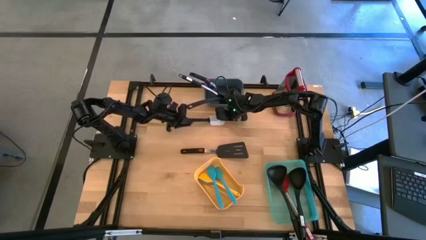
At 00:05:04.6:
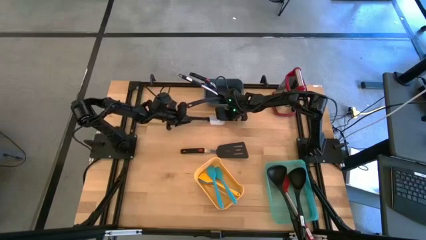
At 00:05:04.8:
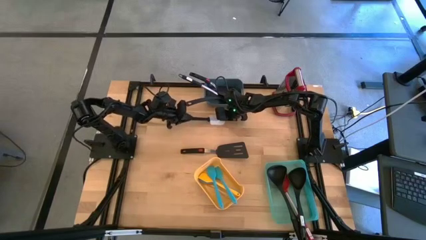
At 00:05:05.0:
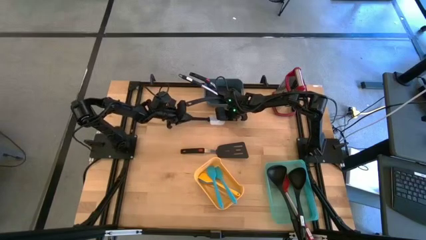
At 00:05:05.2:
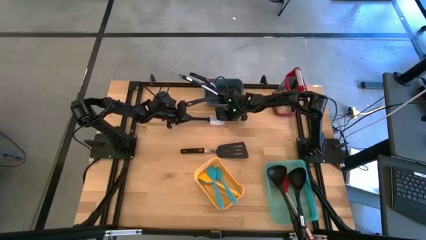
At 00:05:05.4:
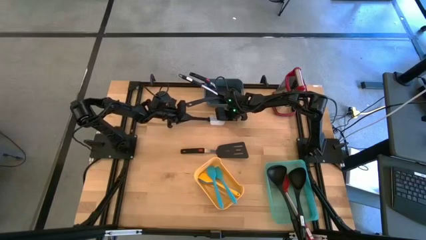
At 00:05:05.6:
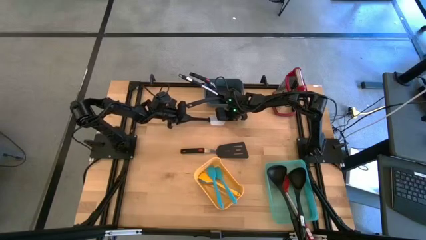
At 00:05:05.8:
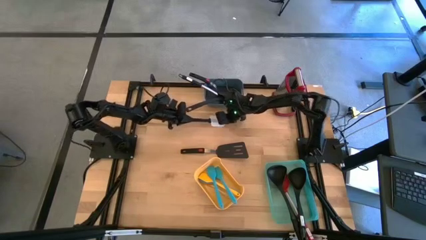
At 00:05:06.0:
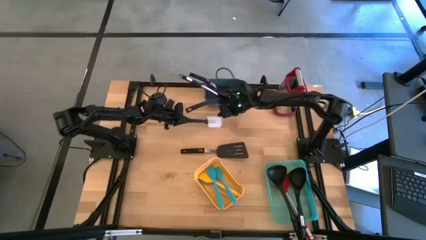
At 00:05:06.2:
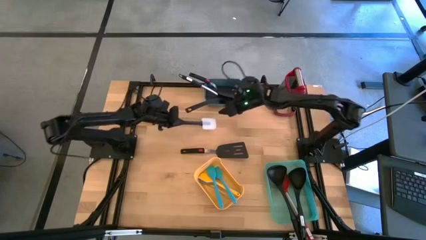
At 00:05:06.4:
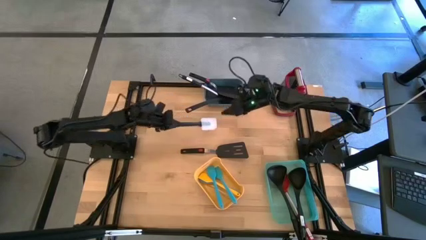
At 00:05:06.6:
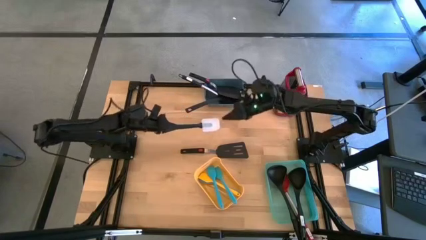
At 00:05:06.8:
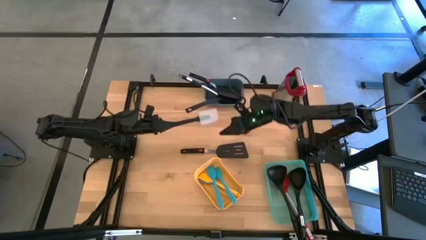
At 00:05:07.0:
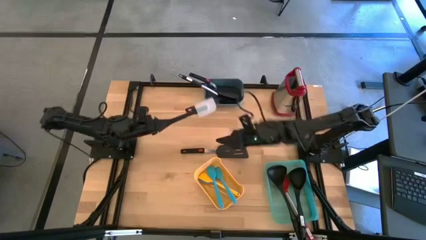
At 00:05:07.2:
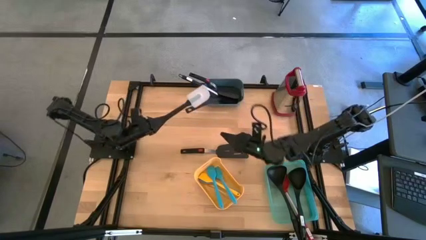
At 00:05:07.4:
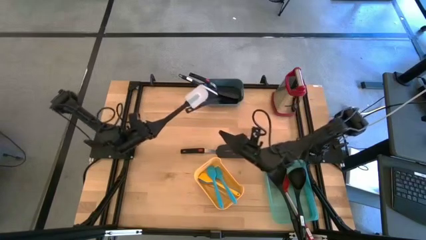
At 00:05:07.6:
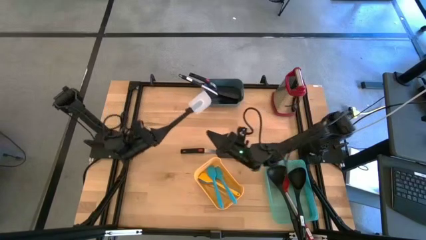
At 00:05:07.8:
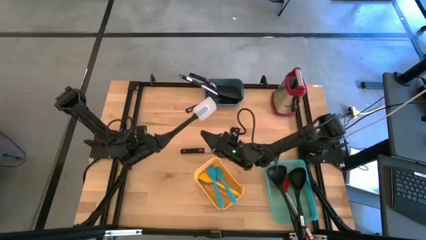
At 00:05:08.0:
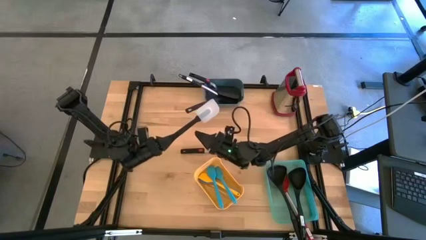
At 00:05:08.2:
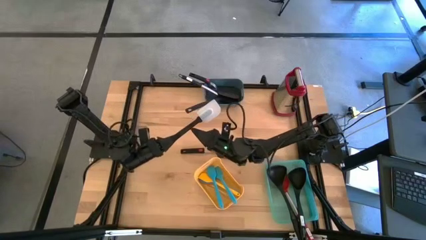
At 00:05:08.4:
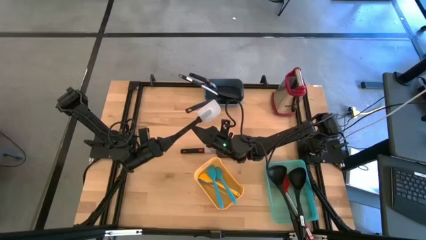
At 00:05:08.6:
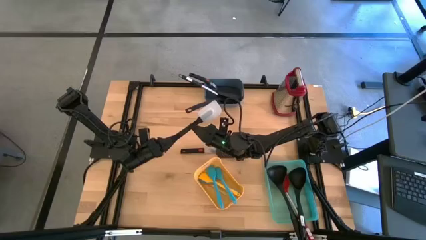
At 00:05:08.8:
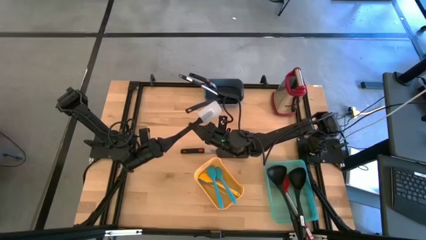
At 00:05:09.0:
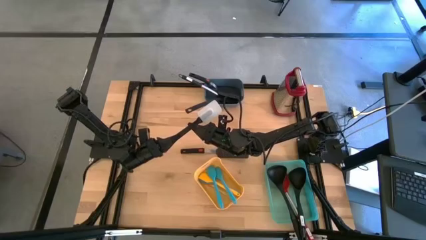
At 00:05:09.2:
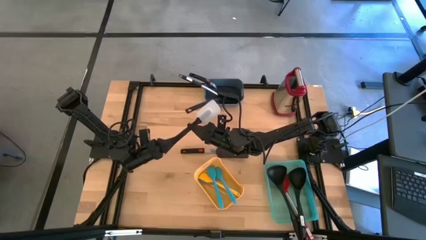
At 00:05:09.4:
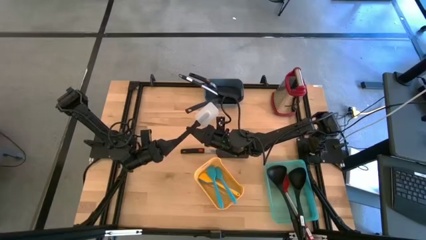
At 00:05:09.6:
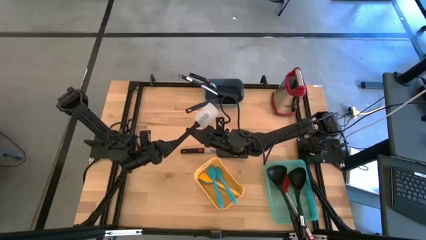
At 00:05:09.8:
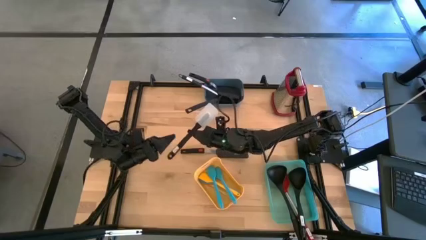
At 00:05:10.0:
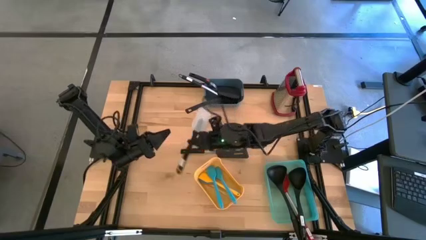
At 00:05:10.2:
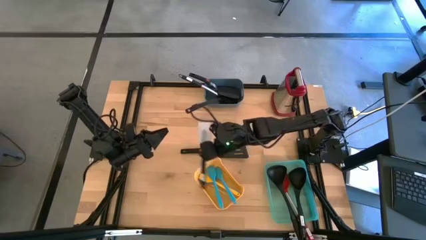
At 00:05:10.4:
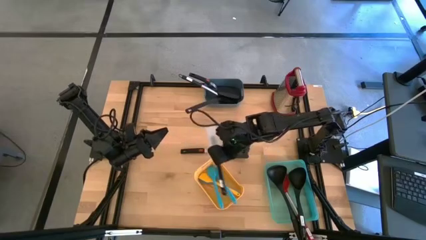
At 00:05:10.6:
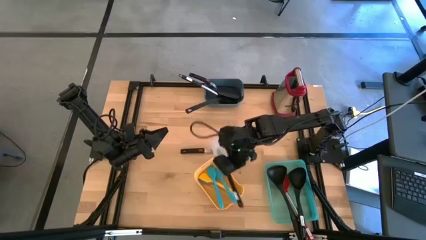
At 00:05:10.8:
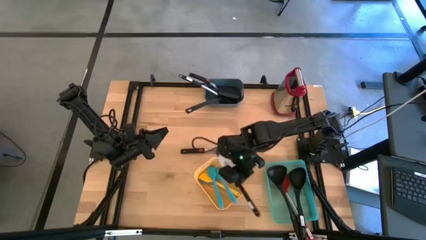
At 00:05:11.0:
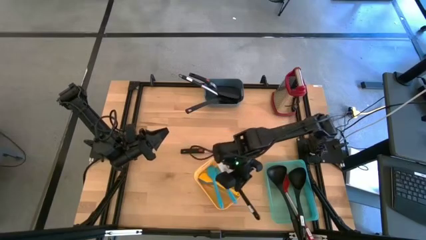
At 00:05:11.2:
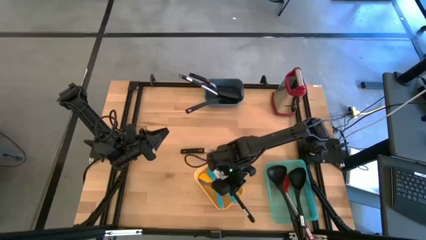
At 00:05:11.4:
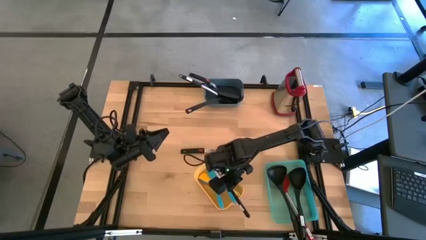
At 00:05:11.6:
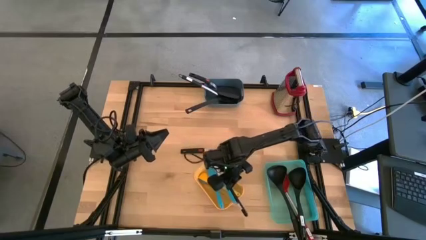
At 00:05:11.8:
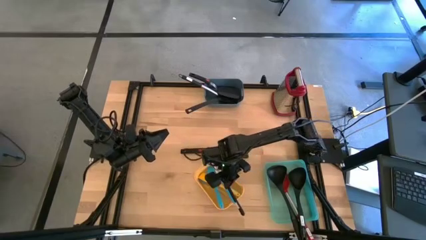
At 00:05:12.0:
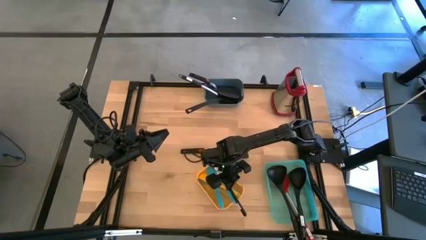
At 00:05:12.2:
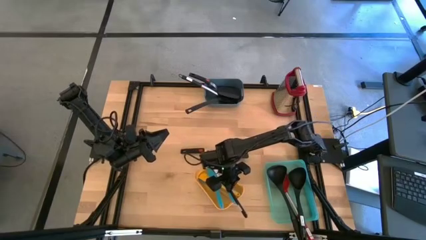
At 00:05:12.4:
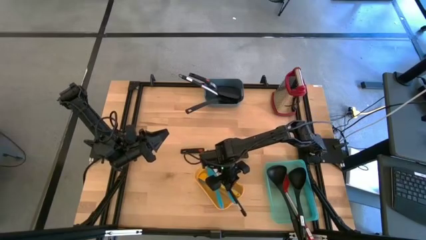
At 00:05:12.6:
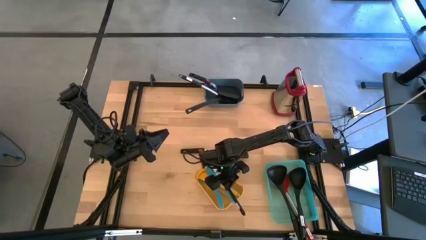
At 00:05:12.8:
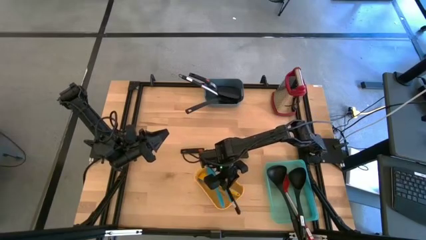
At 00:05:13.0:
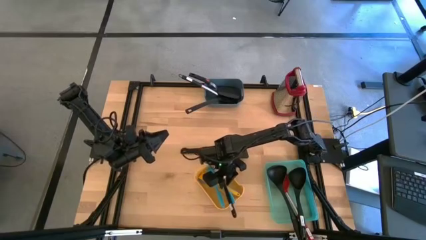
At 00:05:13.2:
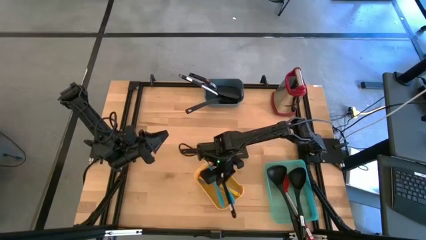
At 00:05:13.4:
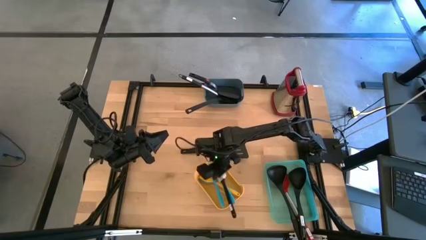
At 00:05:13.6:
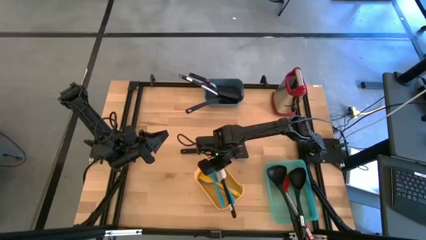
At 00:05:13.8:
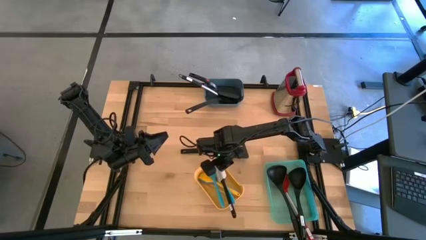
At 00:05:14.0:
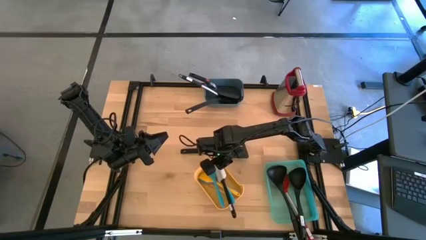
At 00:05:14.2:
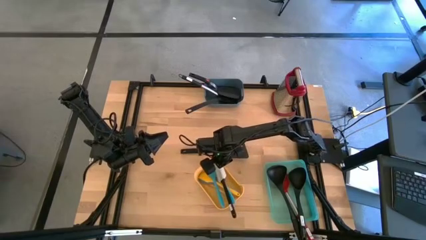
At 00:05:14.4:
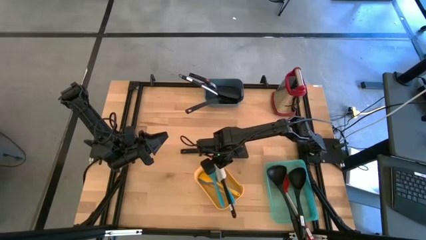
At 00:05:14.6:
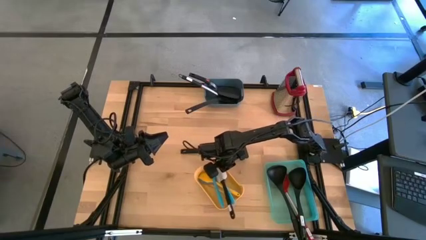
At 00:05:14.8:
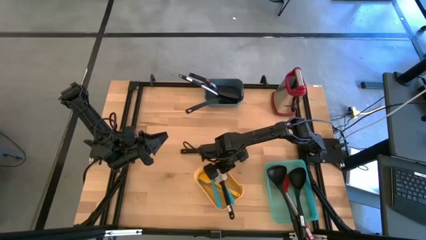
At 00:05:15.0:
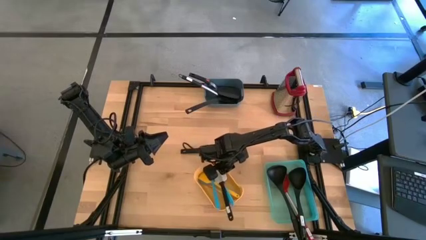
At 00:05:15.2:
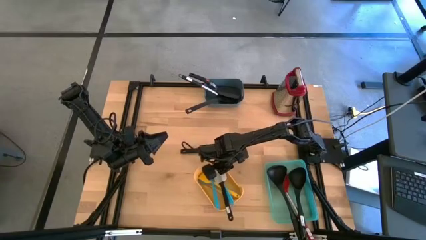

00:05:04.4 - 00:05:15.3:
Task: Pick & Place Kitchen Items
Put the small white spatula into the yellow bin

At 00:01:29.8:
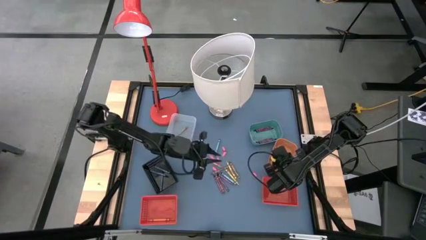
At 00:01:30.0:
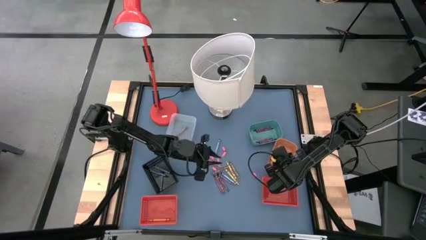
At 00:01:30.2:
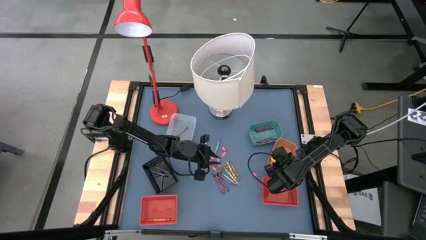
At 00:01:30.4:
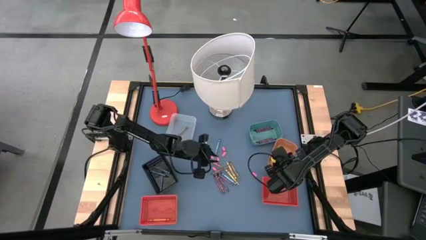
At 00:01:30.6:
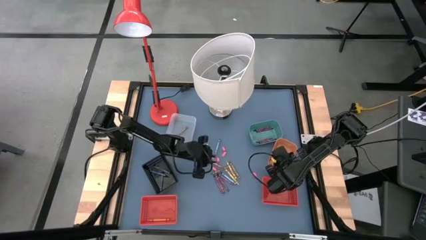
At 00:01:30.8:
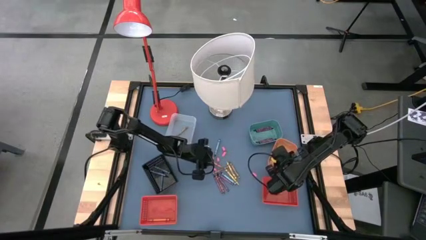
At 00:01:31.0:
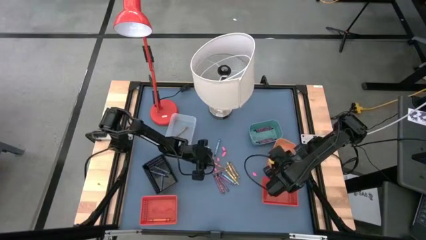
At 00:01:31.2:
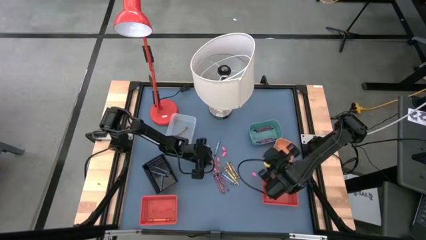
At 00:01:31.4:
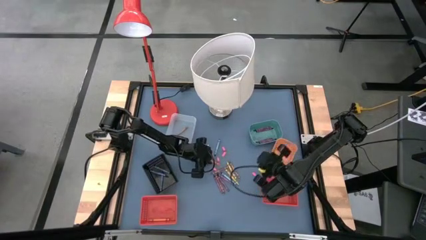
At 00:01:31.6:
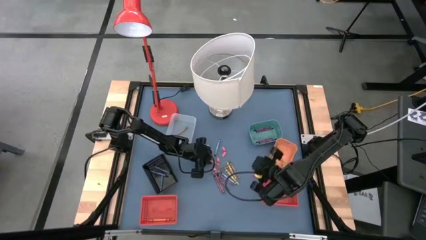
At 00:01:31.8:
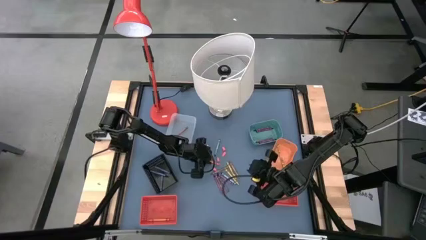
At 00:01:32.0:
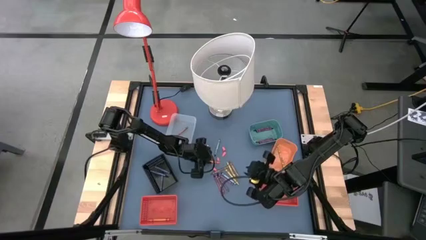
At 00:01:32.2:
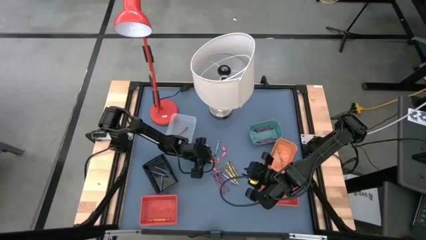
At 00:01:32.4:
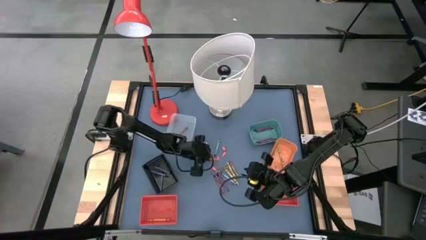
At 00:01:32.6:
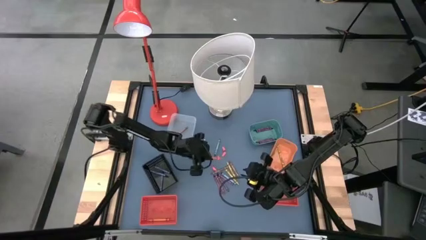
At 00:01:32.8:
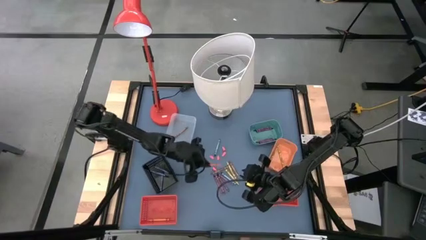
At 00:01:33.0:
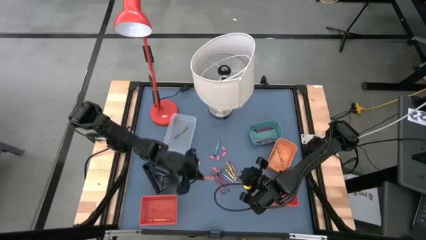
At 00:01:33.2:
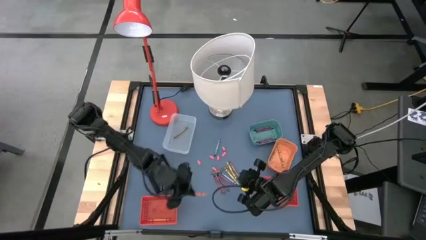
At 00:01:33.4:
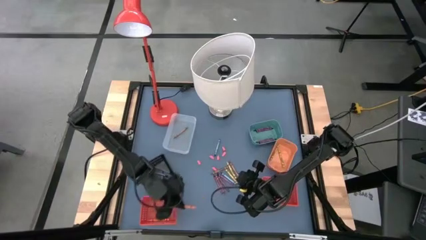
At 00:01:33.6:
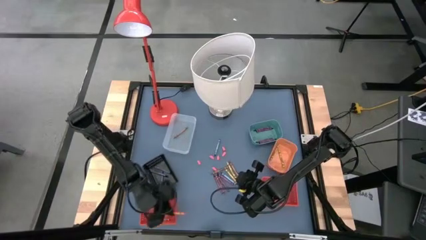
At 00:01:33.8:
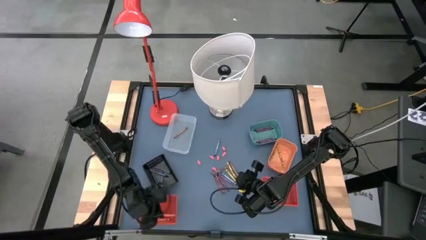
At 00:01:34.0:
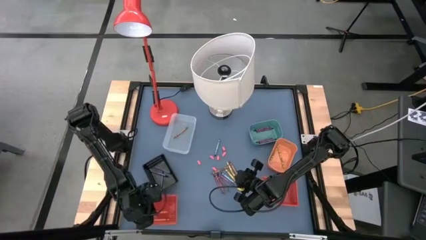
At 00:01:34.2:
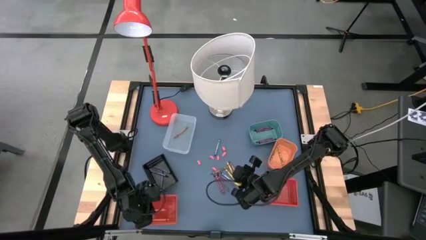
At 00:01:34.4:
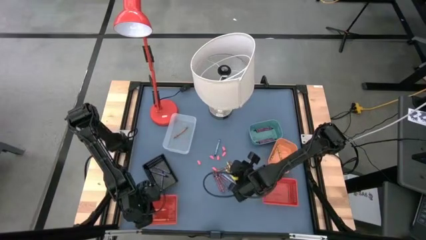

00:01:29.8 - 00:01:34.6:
Task: Sort crayons
Put the orange crayon into the left red bin
